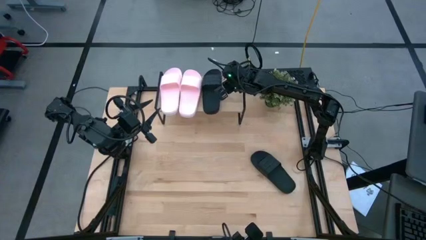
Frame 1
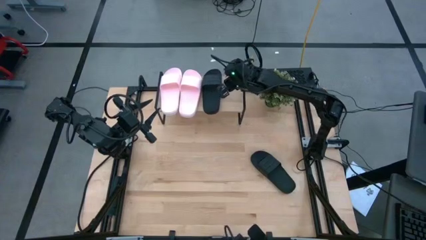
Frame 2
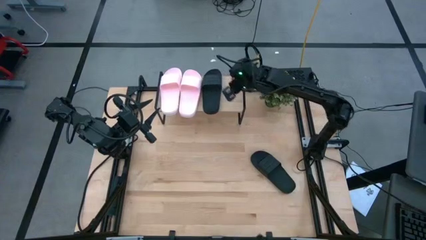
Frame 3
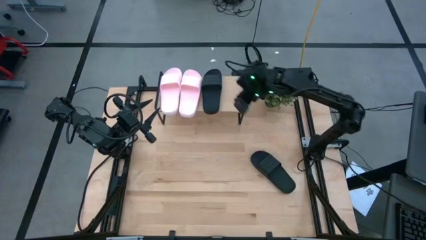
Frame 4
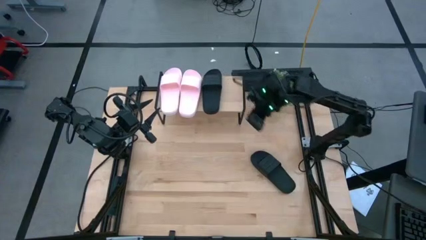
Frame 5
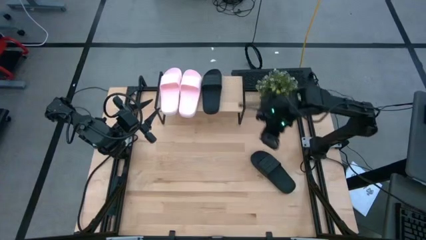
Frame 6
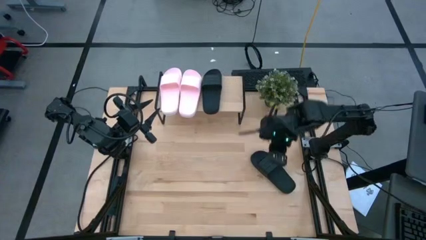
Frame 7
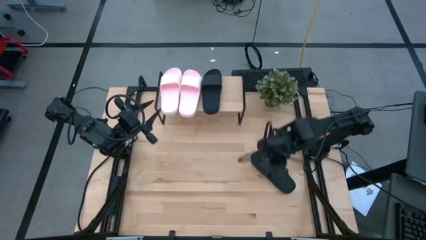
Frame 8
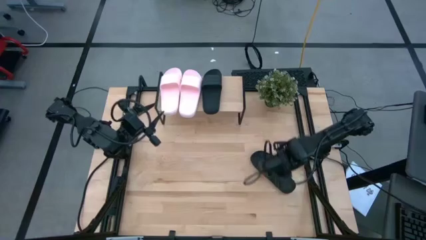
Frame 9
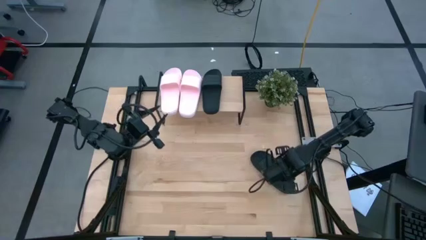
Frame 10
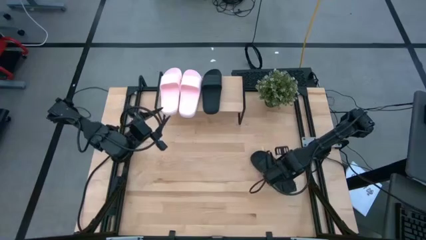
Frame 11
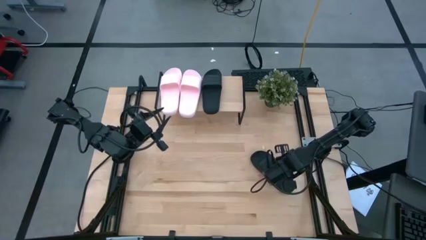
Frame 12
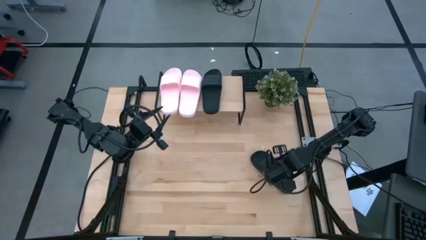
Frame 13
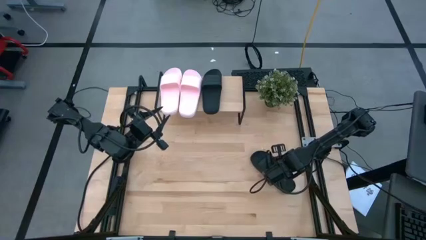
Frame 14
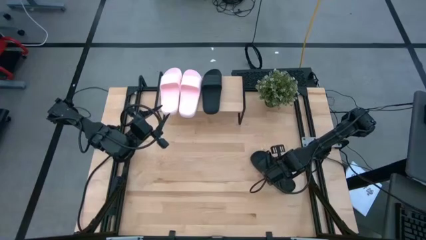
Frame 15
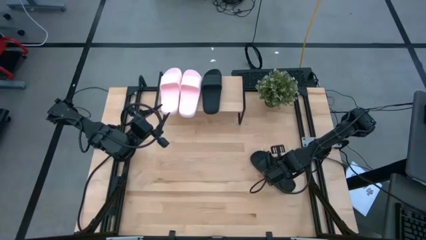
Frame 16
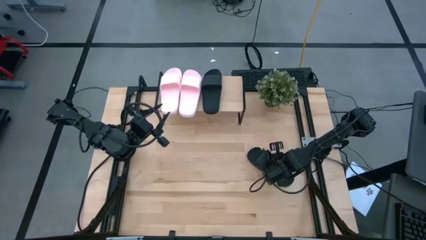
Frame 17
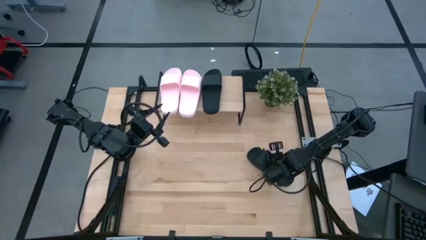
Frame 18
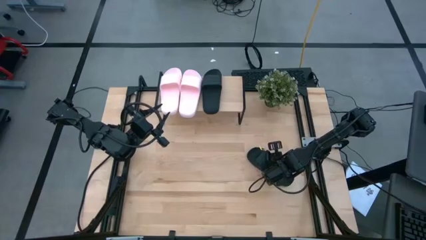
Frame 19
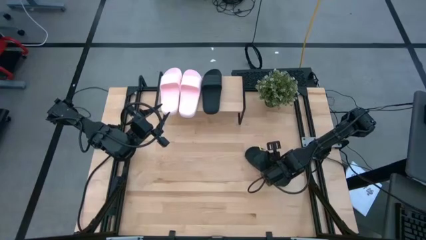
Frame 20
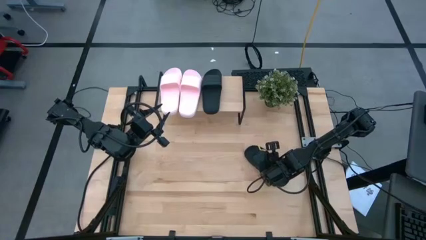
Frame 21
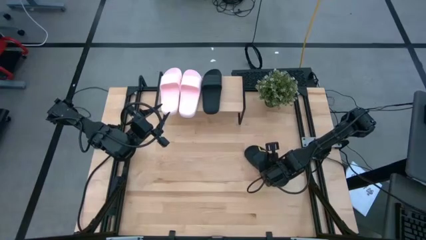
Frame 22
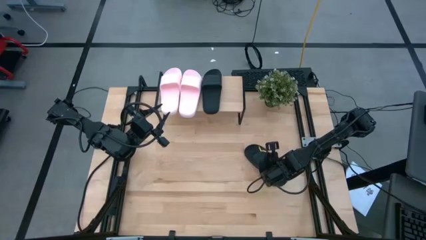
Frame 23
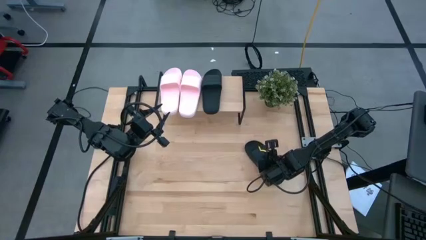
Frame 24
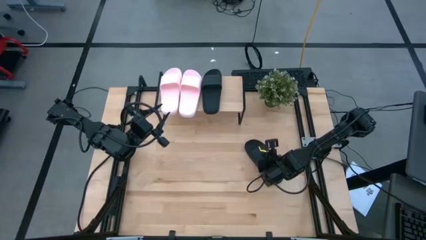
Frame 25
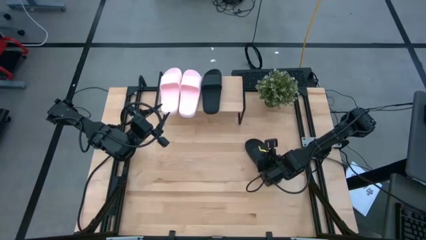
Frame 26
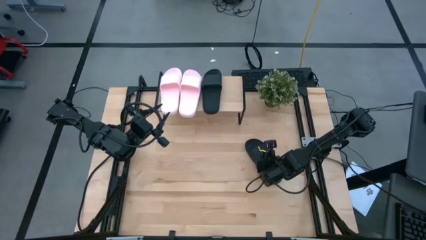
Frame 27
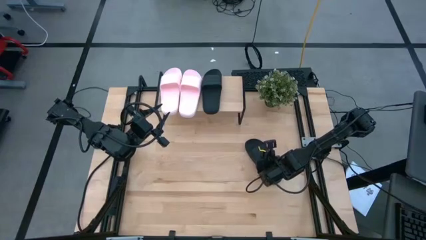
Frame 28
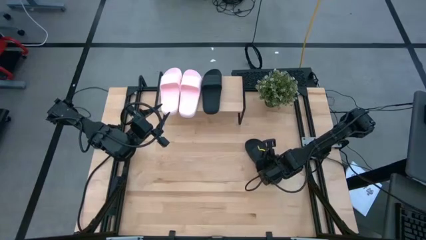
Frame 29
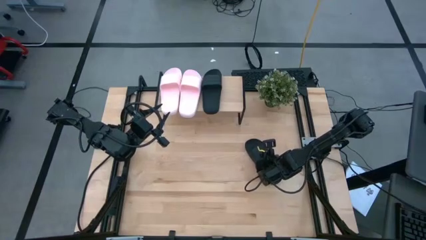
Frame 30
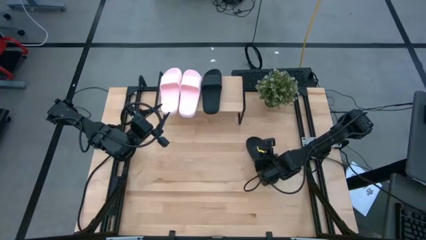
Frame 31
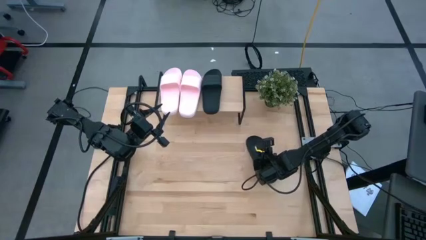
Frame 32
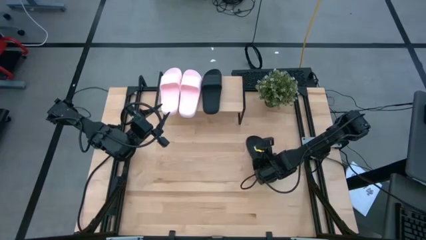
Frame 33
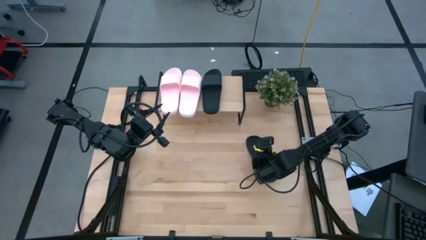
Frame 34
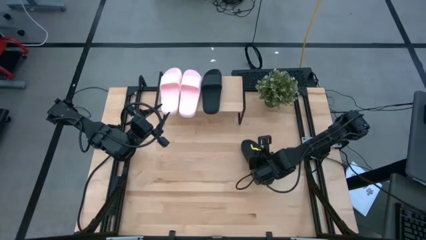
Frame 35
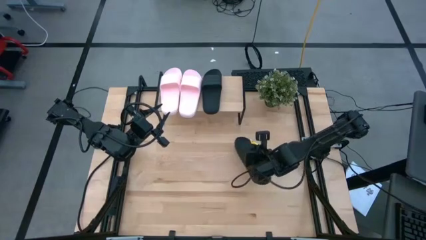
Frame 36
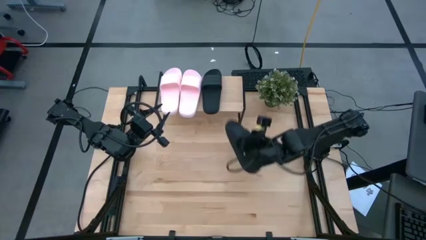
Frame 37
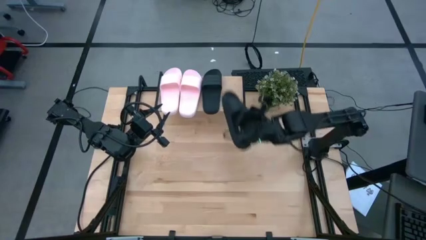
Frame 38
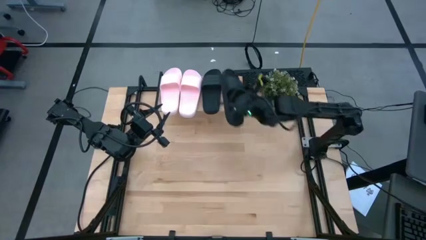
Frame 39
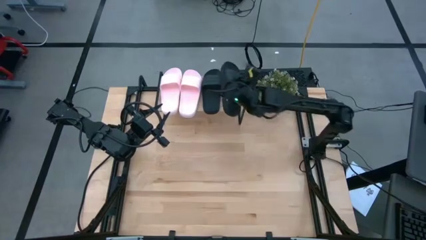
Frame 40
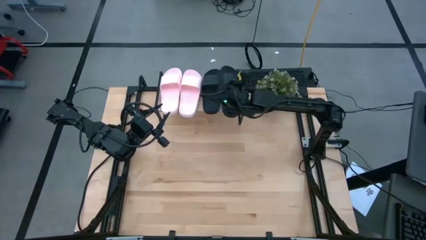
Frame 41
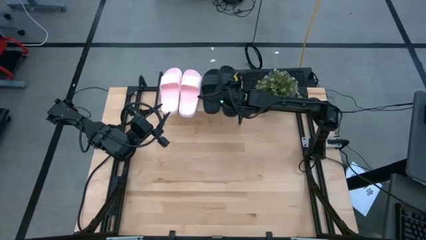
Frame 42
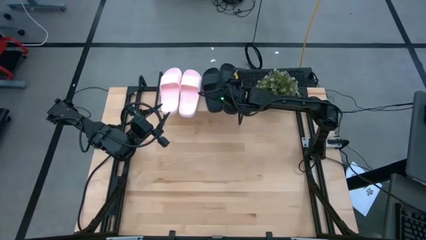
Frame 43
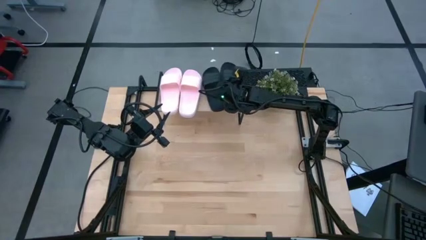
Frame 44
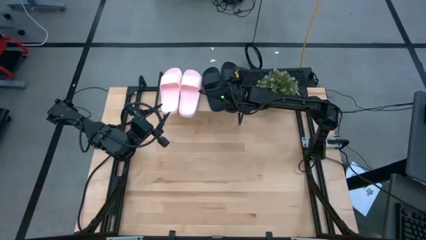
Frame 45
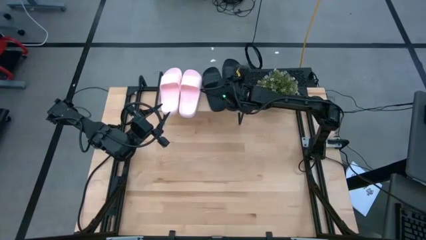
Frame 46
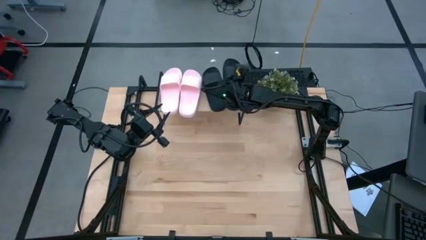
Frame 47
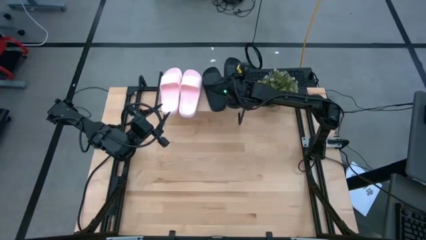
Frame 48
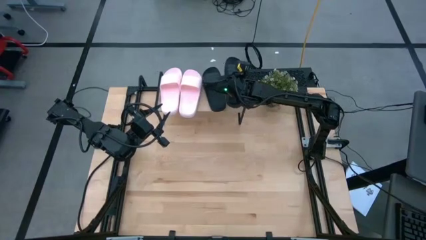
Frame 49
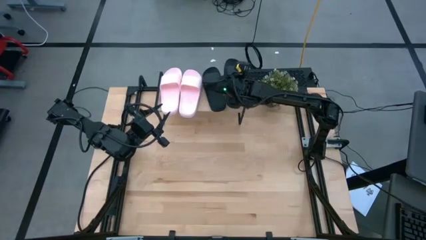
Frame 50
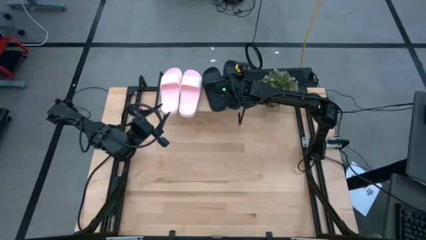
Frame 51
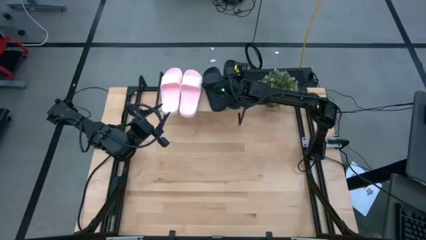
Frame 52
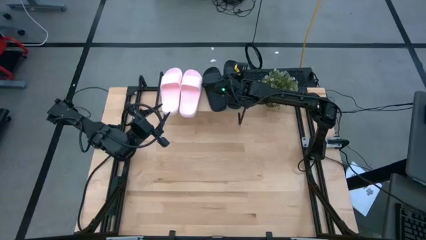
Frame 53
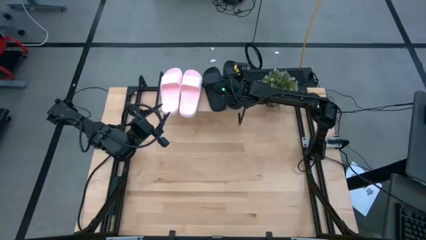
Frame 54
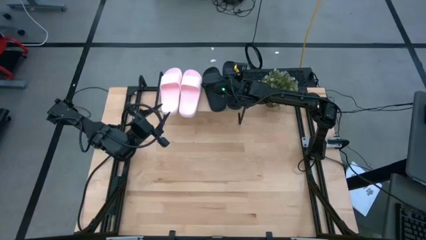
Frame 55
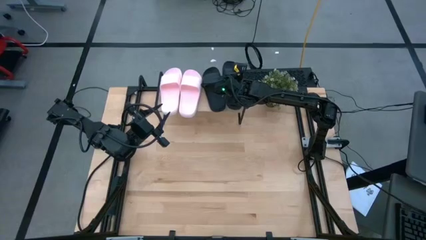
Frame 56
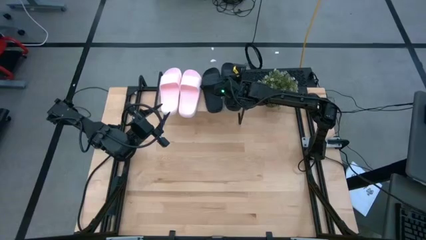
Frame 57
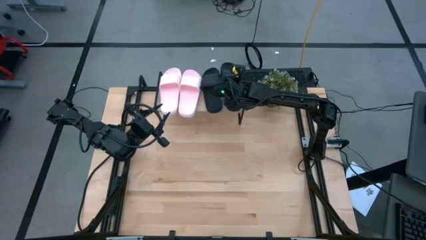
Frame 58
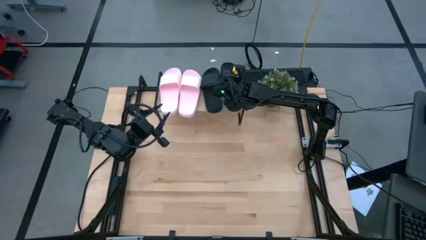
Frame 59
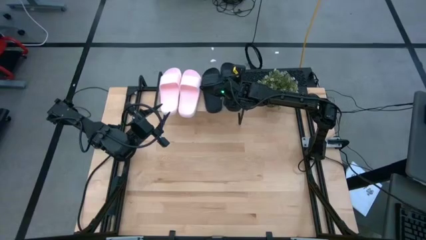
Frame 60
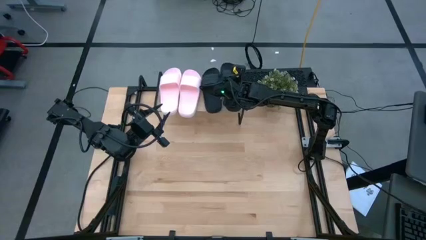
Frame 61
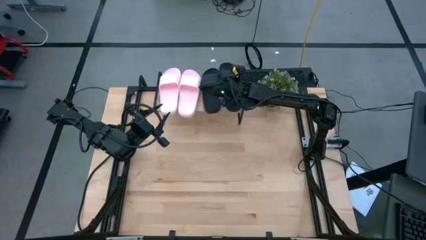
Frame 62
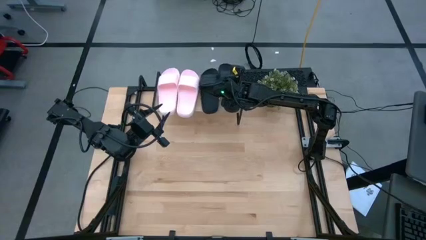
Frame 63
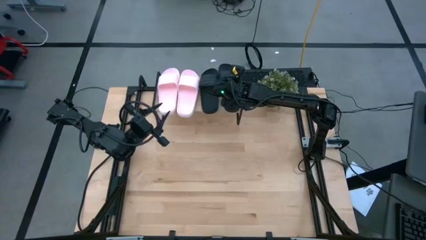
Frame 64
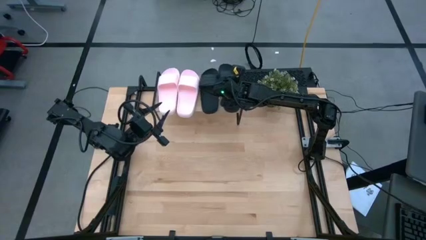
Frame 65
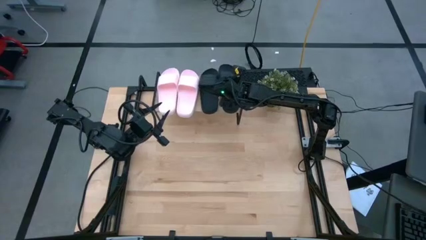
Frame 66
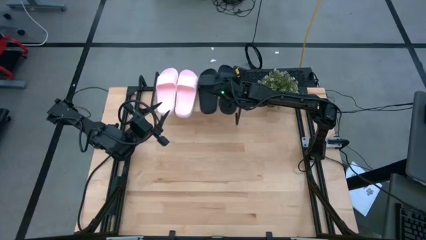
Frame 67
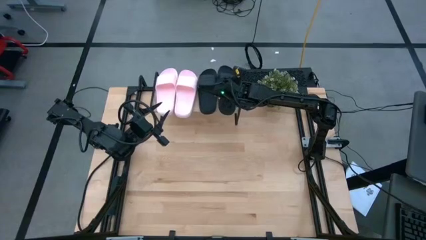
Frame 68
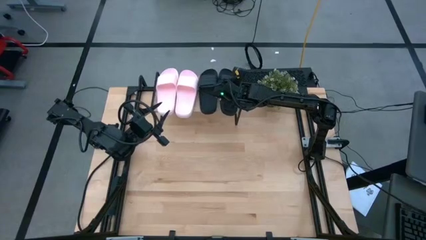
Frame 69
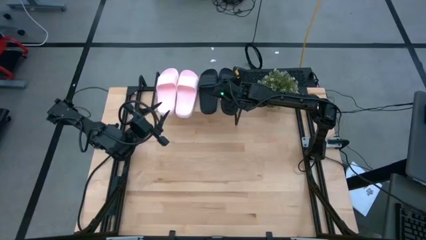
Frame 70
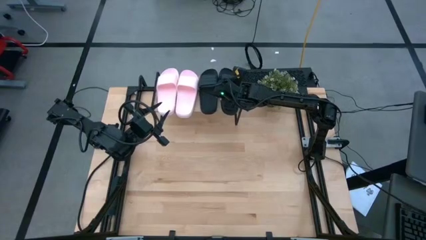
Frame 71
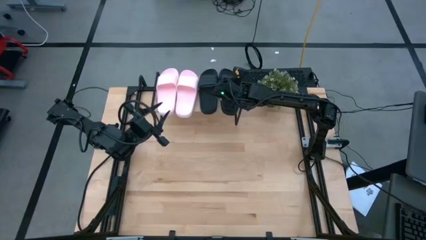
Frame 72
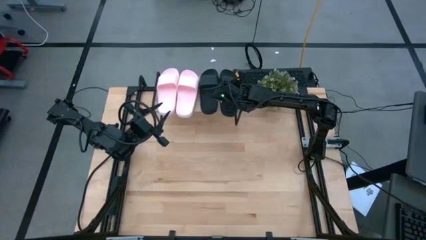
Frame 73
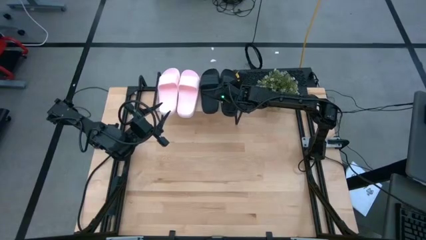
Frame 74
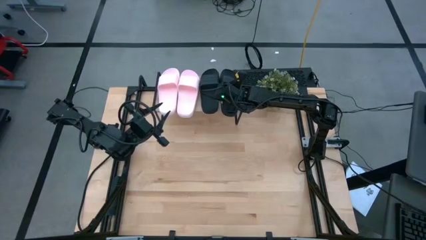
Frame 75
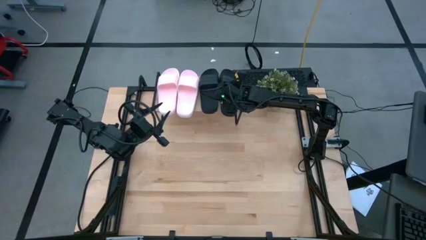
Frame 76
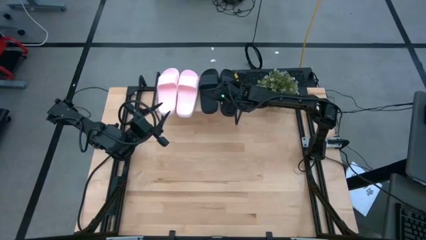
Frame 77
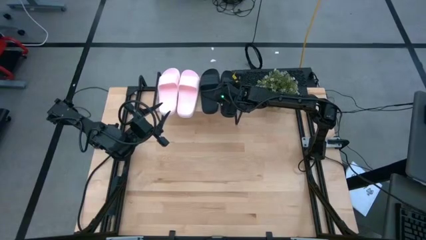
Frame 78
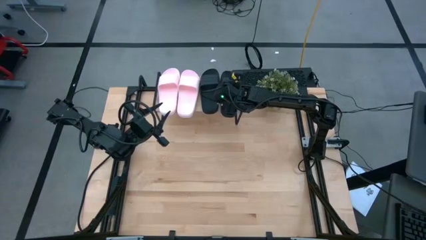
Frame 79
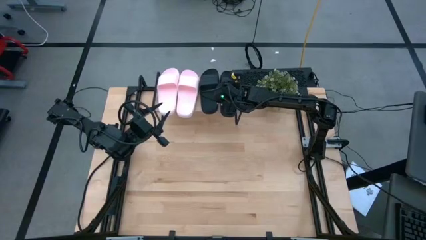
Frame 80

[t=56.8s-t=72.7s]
Task: Pick and place slides into the shelf
Put the black slide on the shelf
